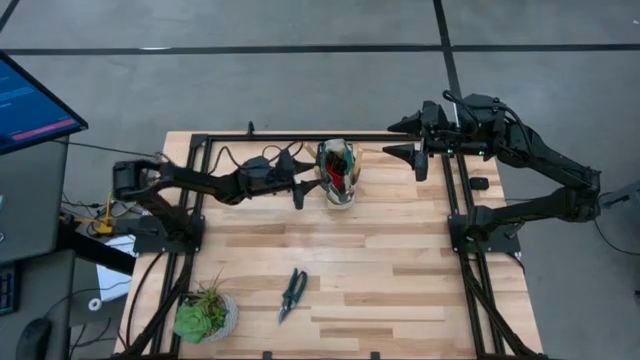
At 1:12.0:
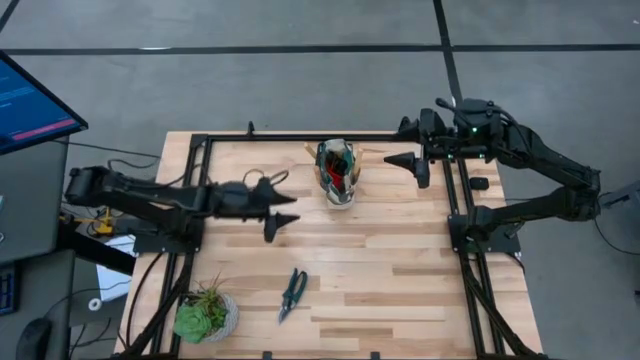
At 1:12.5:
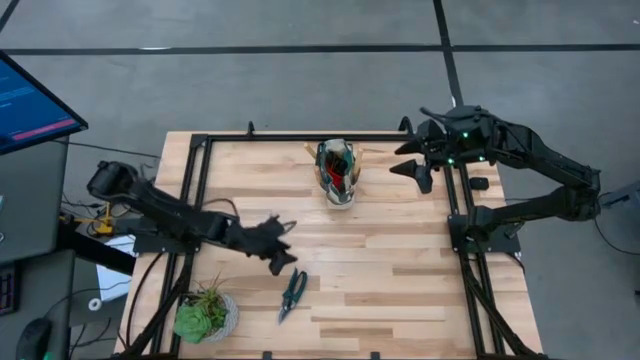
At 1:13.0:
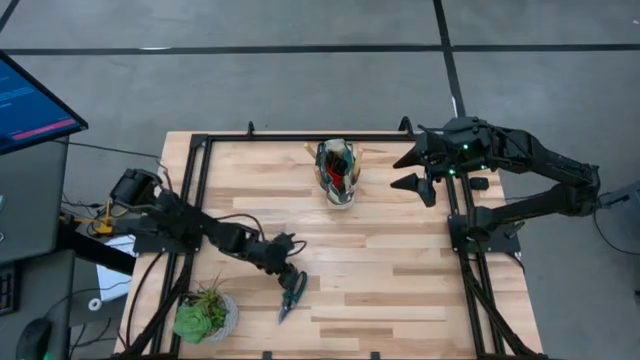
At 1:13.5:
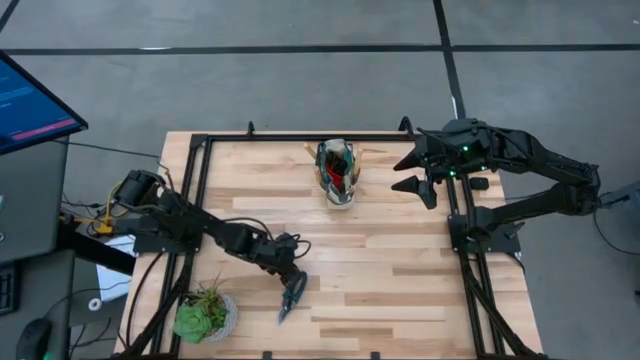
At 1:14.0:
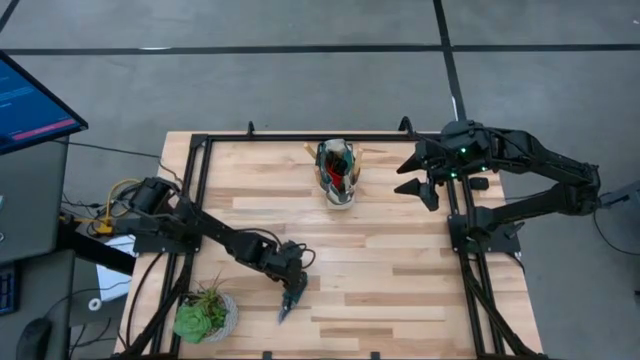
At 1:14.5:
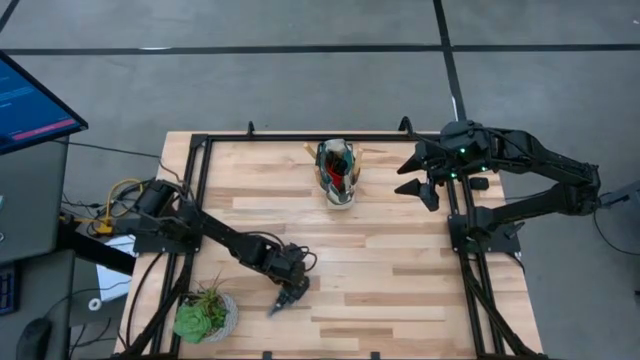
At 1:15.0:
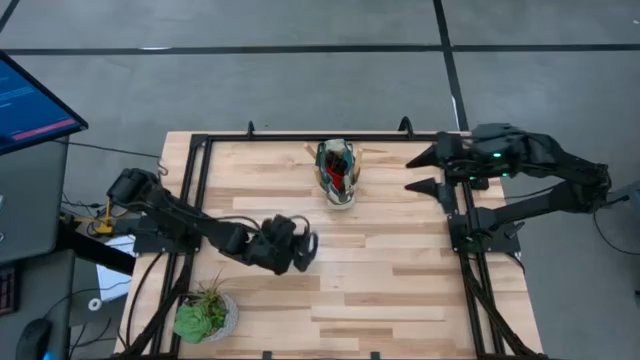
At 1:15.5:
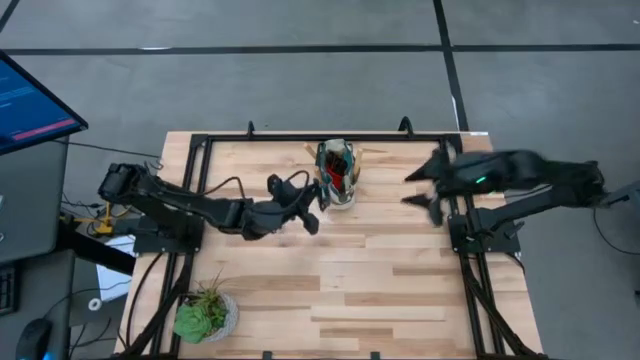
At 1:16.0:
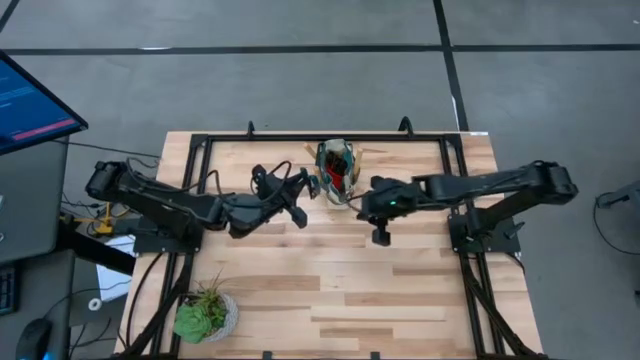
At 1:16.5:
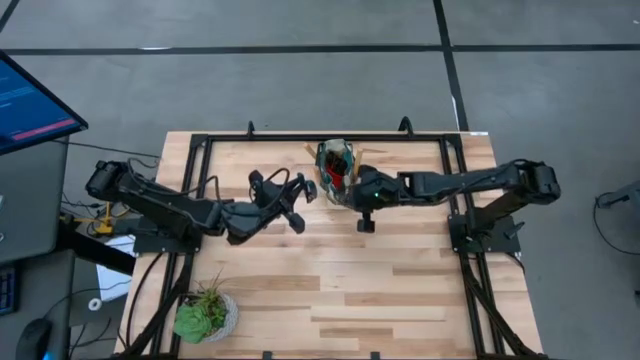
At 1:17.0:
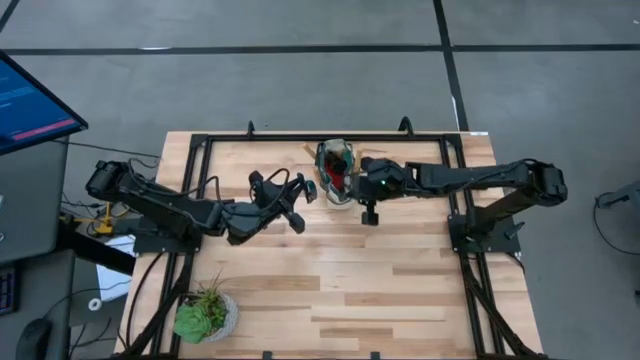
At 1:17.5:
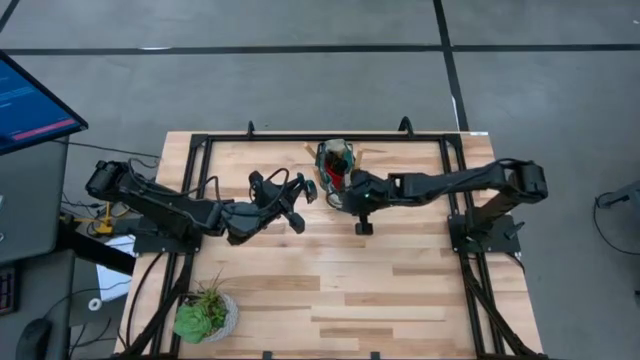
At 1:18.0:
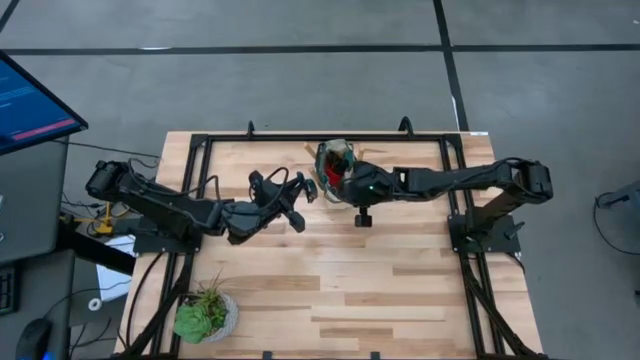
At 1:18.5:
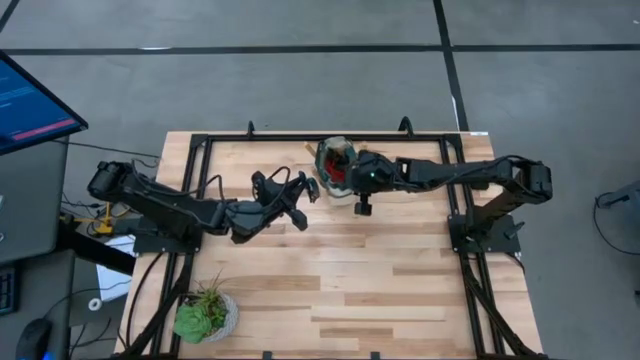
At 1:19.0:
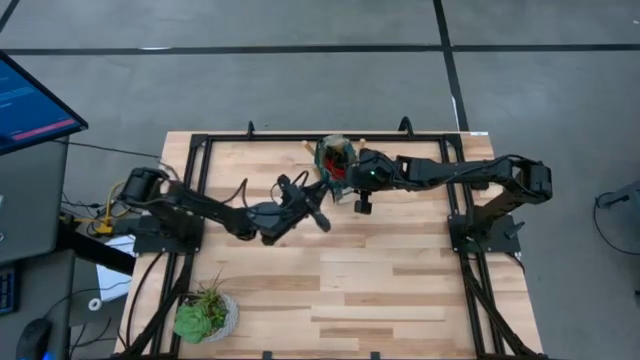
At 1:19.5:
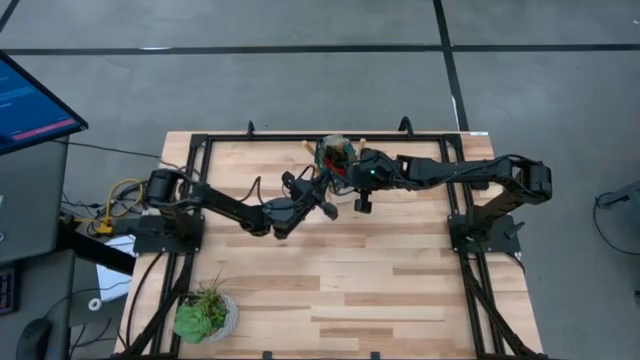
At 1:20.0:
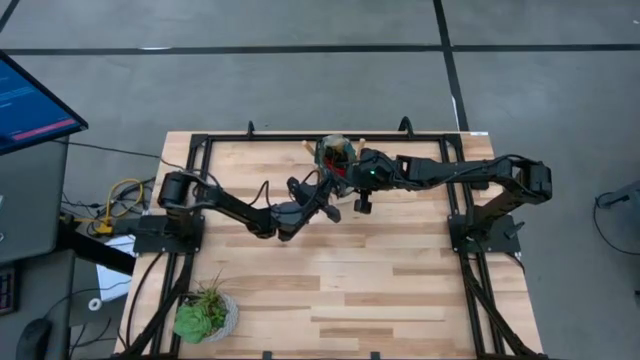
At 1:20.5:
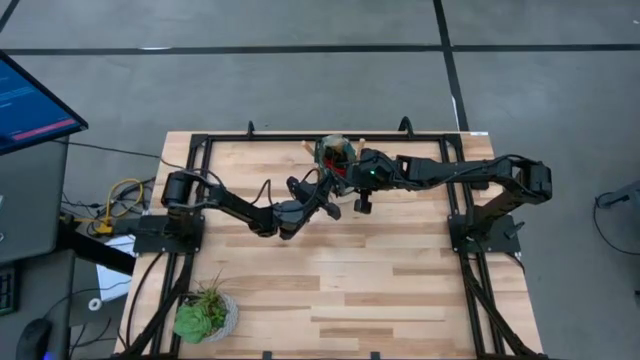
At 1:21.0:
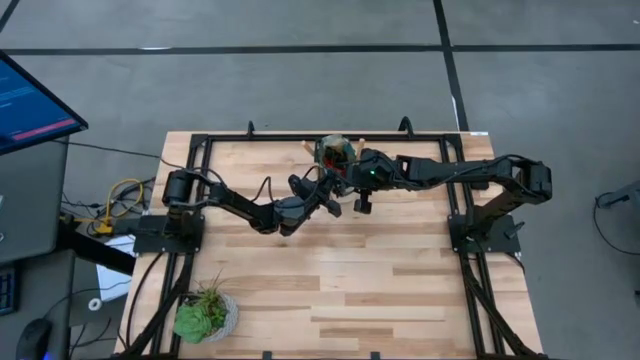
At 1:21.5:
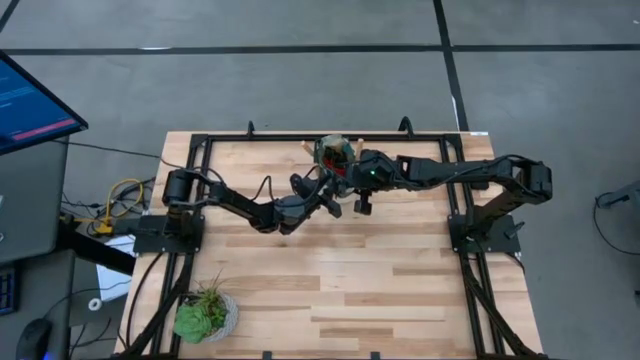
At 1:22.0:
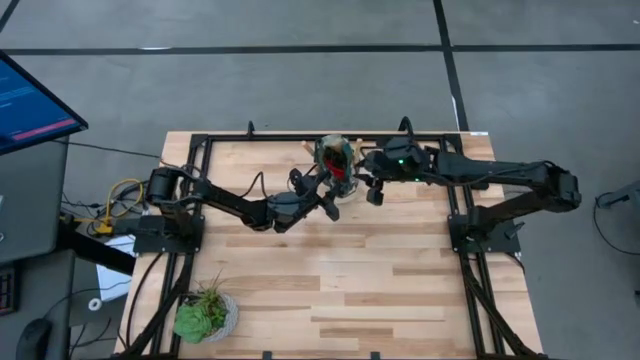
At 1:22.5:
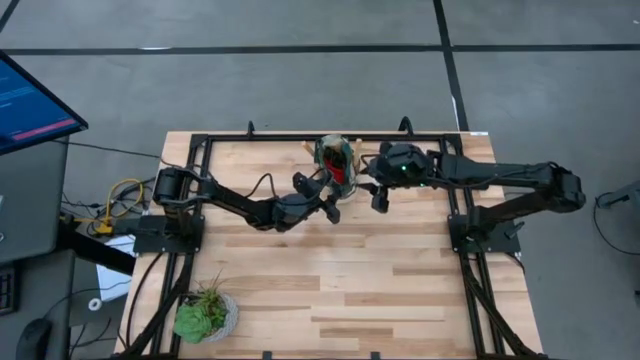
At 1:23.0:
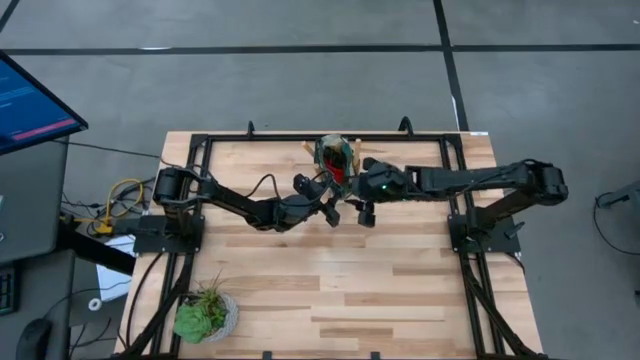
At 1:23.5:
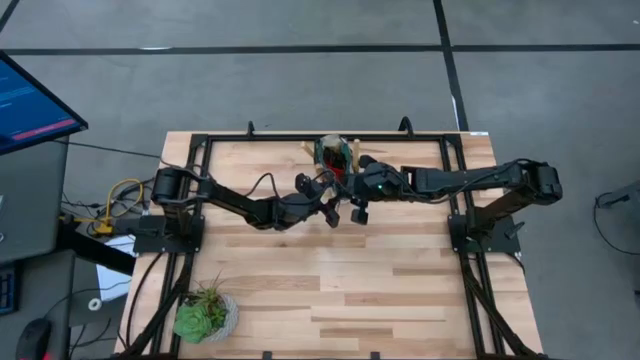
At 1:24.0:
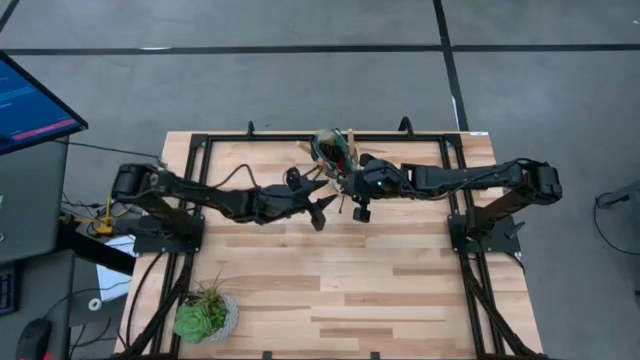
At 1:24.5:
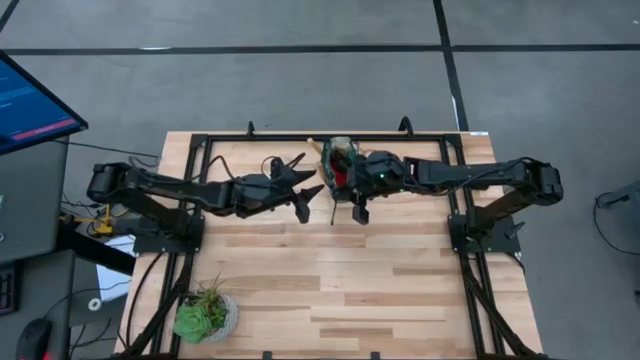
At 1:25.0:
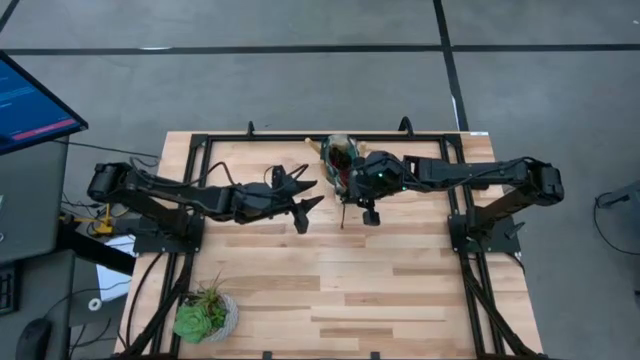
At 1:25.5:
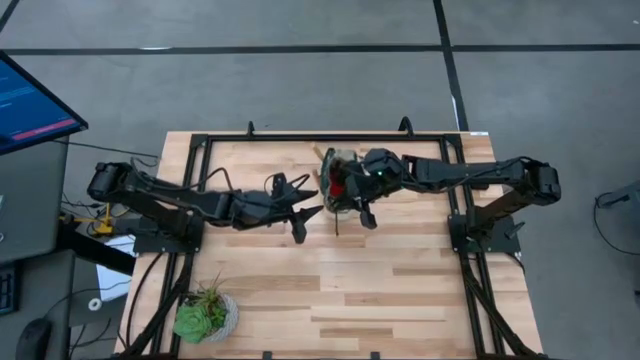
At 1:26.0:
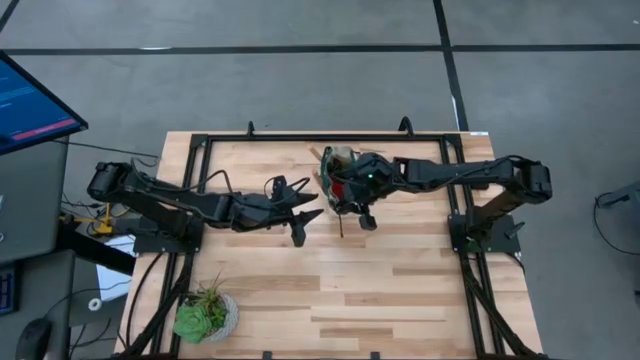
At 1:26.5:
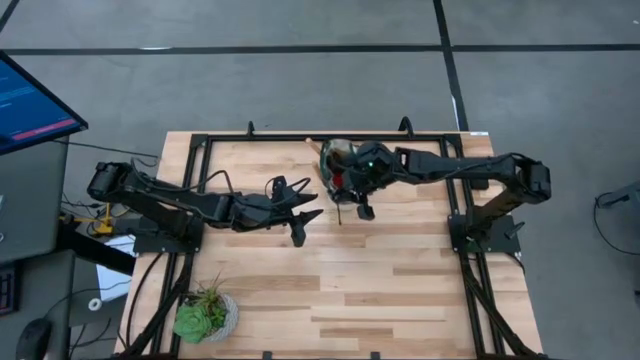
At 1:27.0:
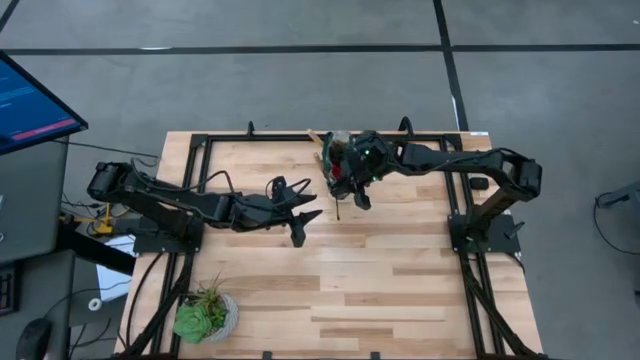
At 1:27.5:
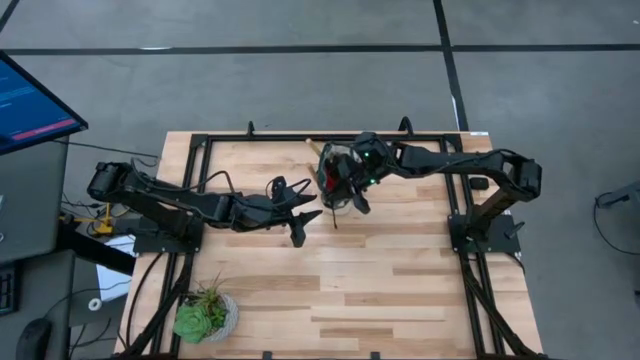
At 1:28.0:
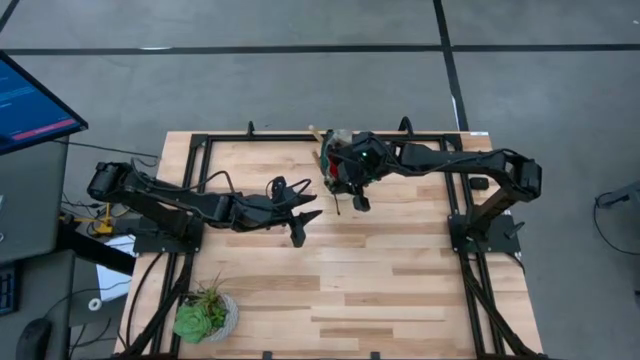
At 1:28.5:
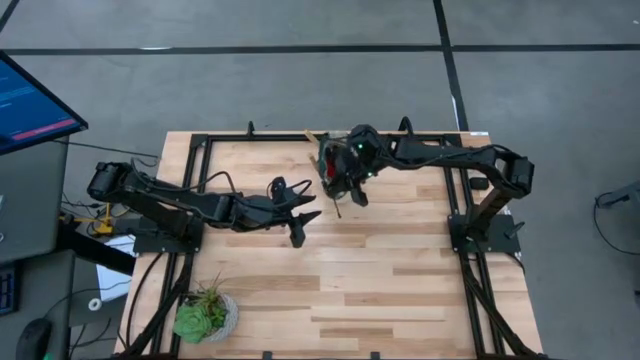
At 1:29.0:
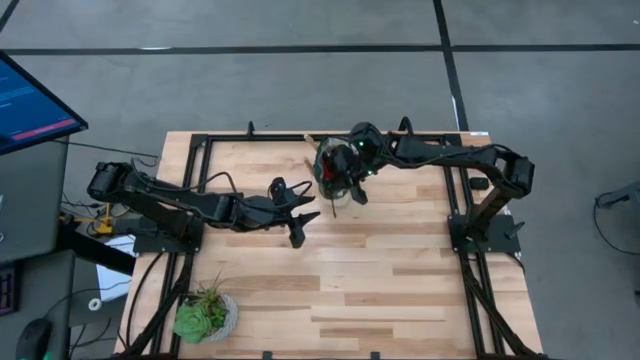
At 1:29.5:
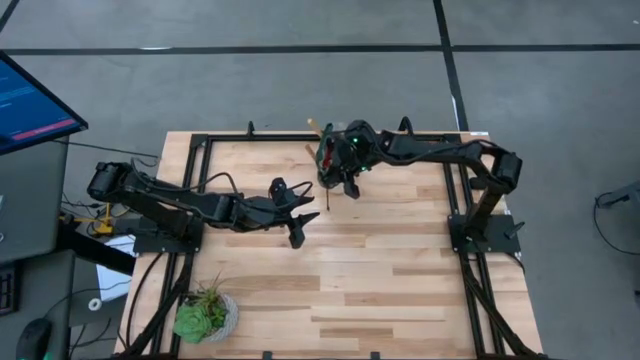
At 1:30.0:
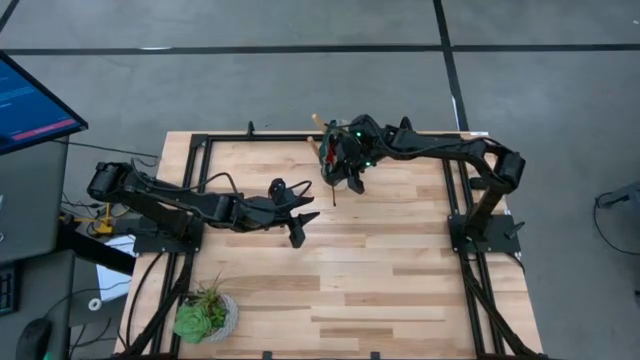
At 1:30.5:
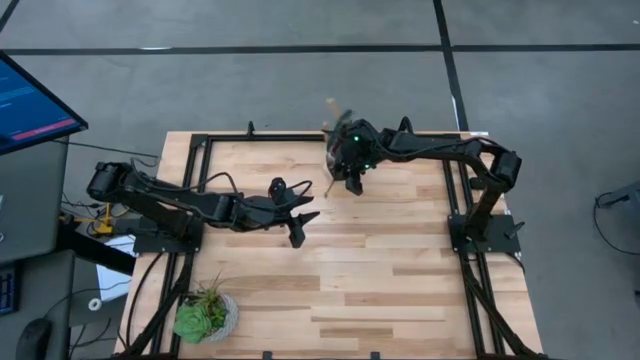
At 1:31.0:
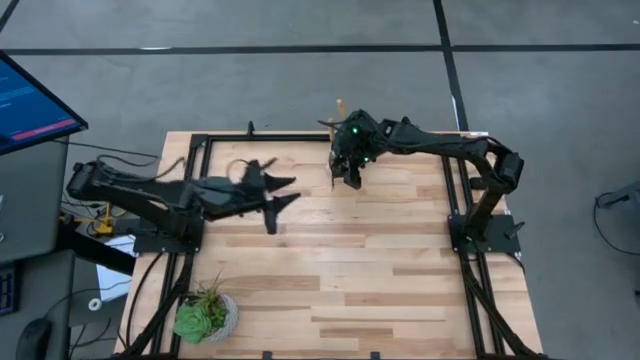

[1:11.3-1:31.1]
Task: Pick & Place Garden tools in Gardening bag
Put the shear scissors into the gardening bag

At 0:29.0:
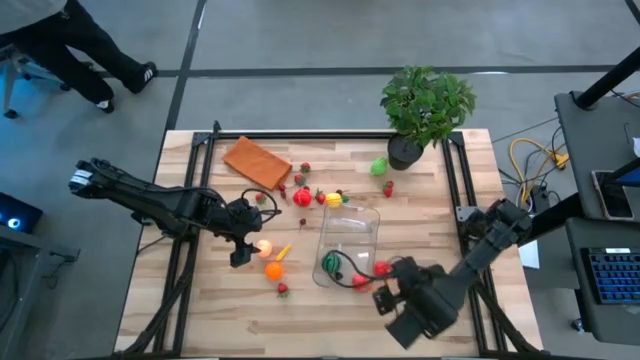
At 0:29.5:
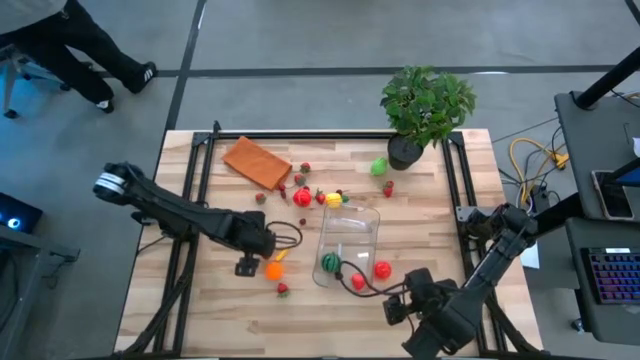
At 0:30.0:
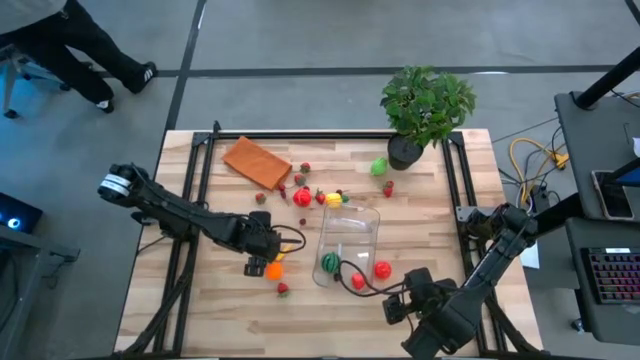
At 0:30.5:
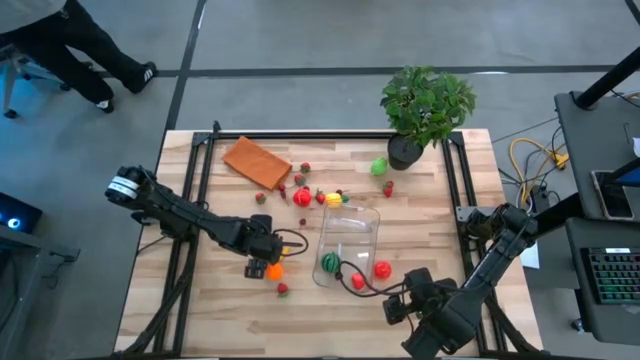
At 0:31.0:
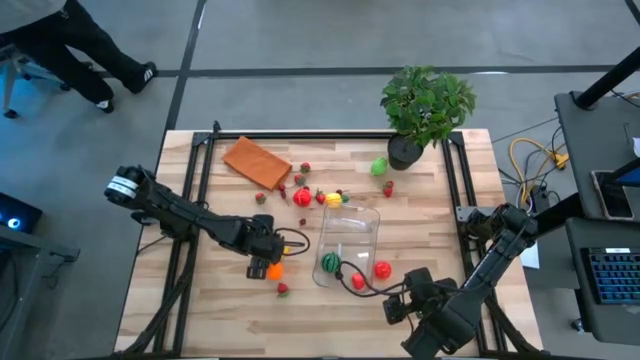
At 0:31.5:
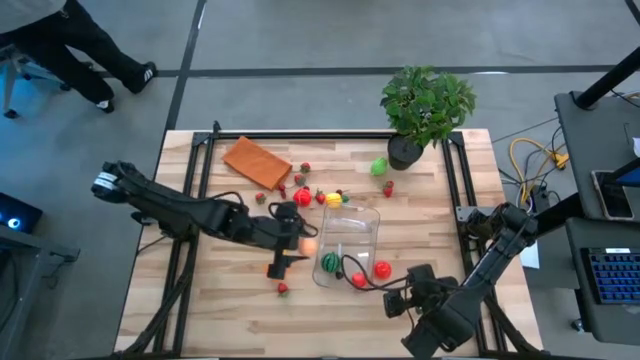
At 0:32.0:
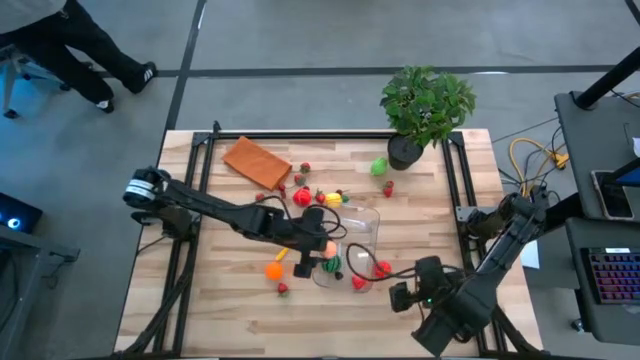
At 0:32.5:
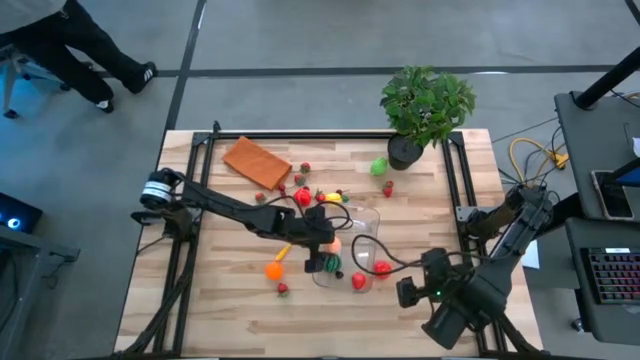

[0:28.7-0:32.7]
Task: Pick and placing Produce into tupperware
Put the peach into the transparent bin
